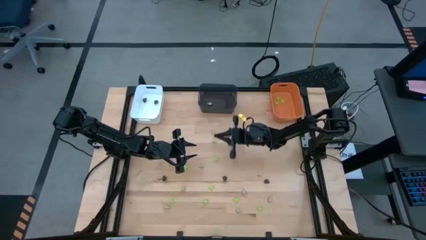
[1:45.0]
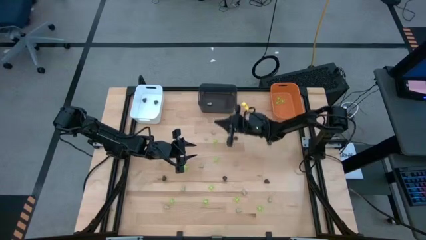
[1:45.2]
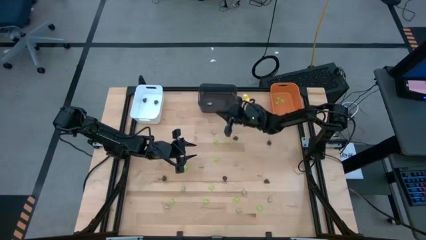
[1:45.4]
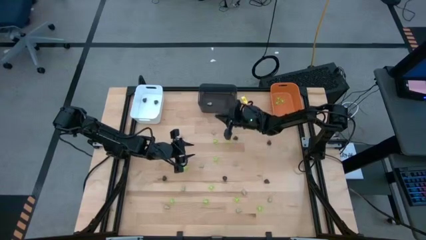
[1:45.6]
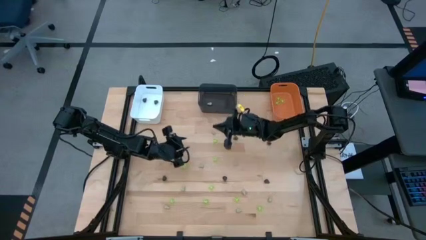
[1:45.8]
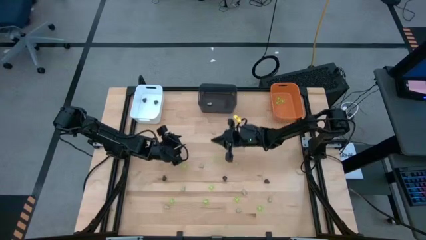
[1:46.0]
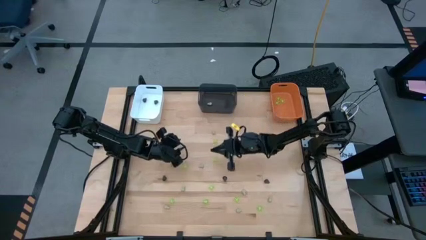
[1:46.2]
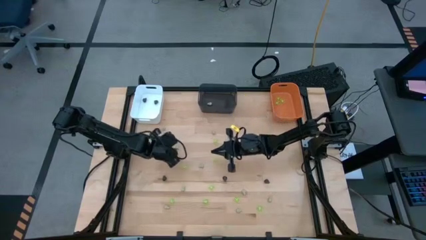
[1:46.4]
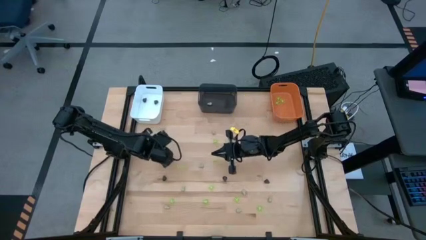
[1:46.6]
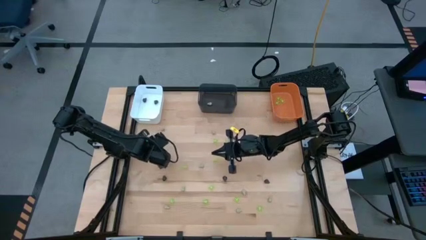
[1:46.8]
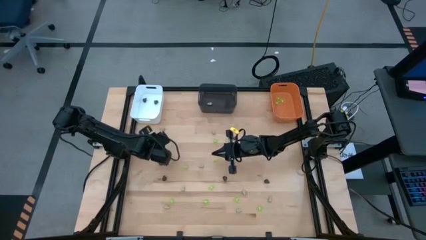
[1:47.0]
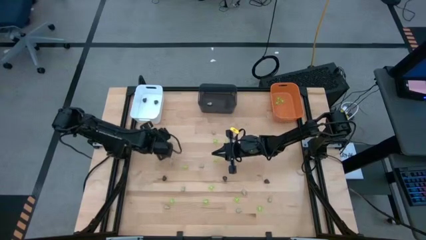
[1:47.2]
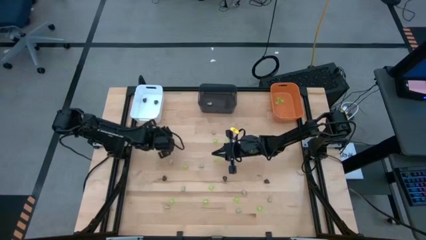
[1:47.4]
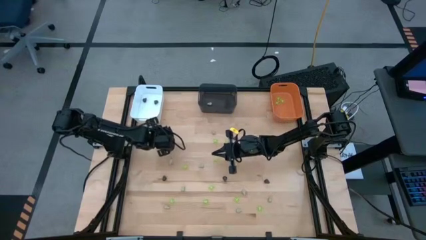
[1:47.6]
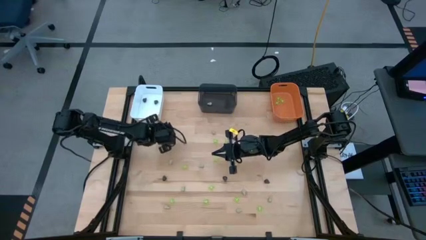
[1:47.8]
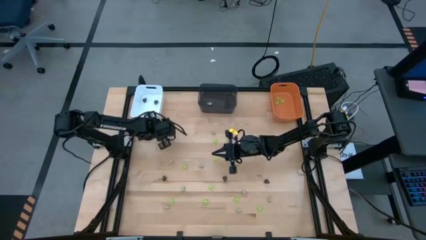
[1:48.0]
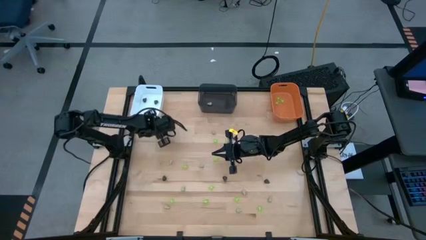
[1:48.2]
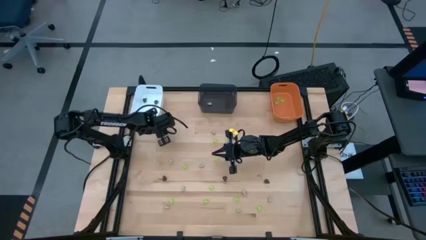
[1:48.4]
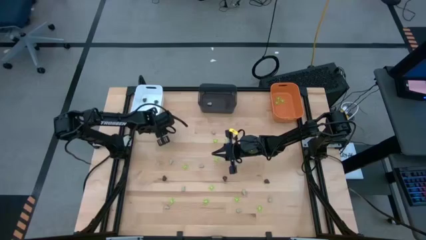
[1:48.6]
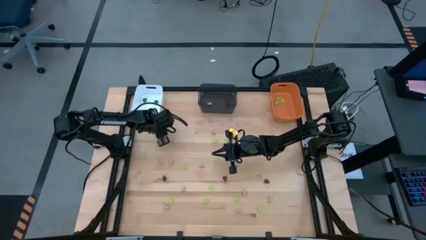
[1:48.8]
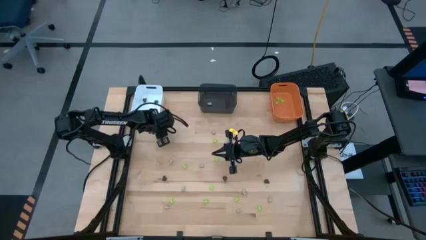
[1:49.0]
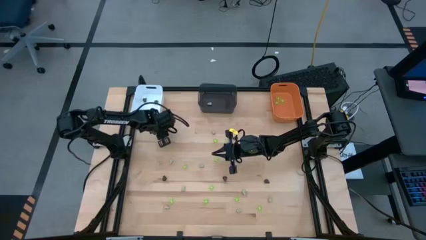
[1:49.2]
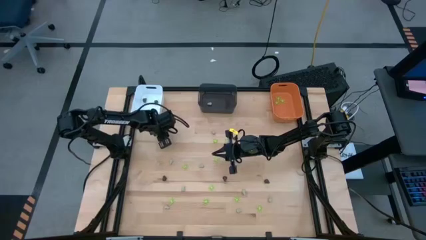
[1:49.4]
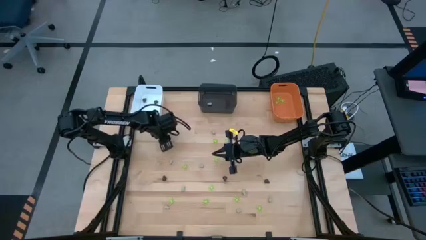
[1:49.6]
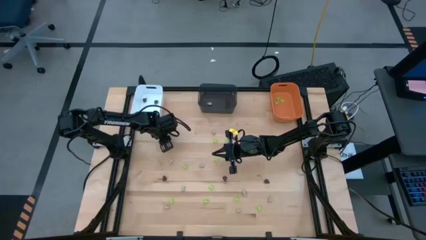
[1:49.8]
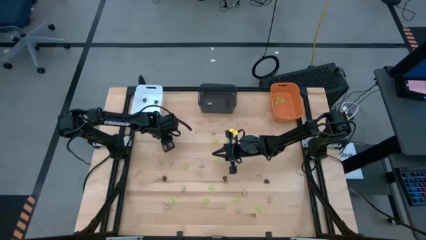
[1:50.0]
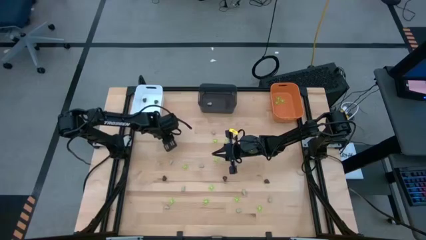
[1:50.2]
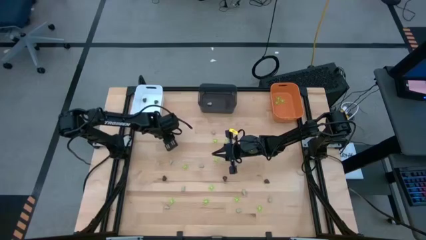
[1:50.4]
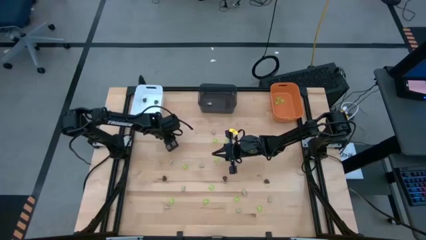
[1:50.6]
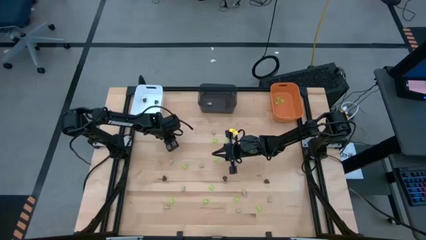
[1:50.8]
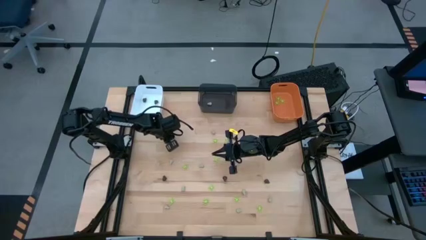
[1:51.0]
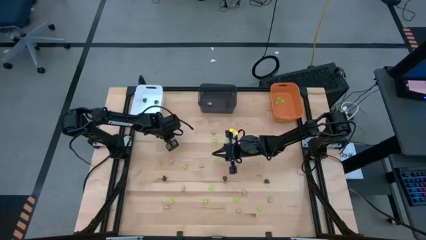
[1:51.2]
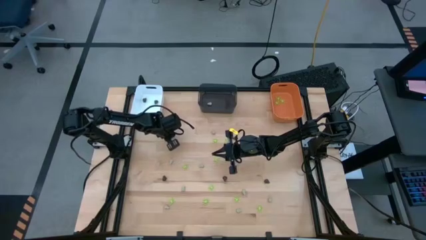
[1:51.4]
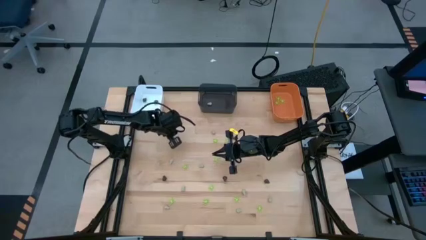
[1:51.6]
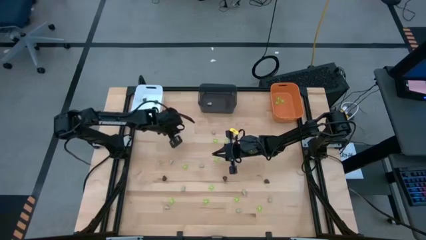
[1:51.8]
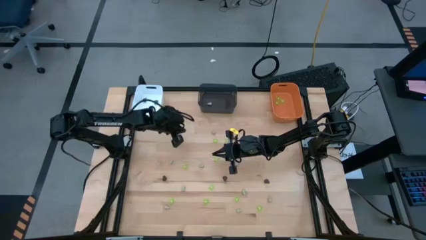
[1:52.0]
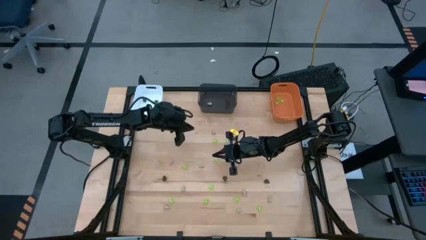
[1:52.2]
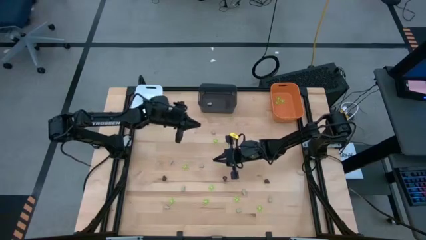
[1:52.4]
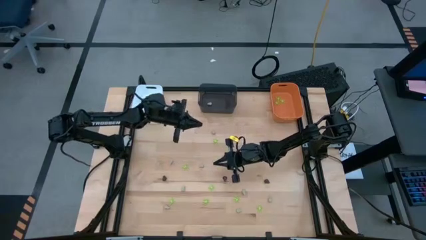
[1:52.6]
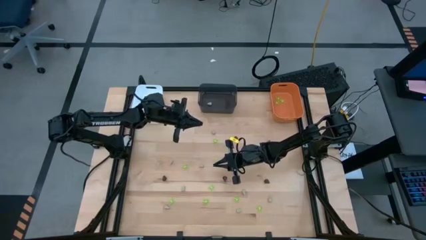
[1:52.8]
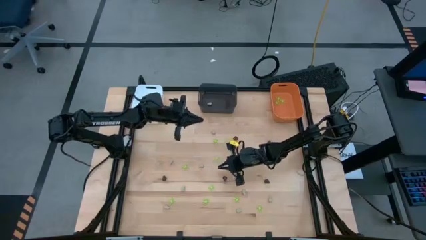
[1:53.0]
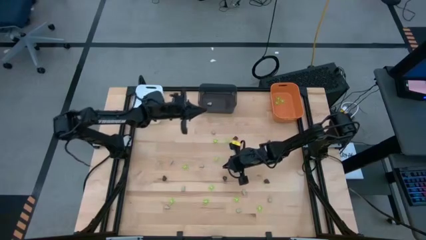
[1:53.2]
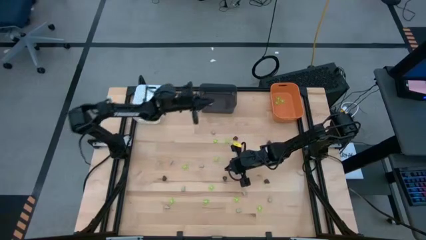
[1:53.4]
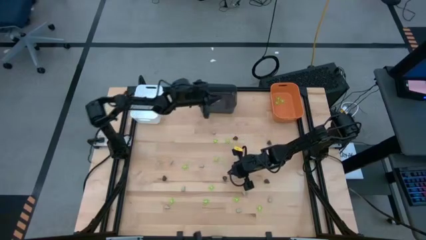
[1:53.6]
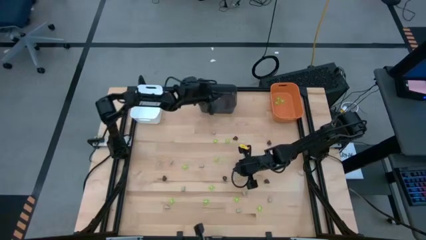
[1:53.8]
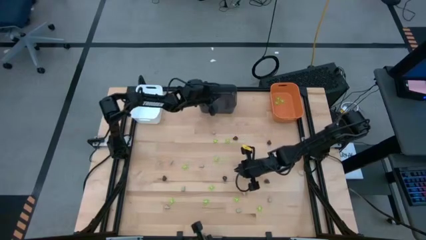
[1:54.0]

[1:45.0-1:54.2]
Task: Sort Halloween decoration
Put the white toy skull into the black bin

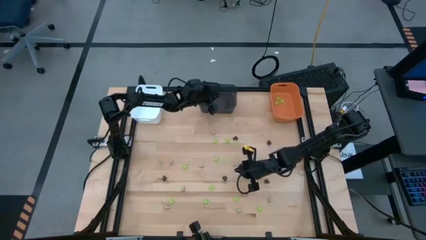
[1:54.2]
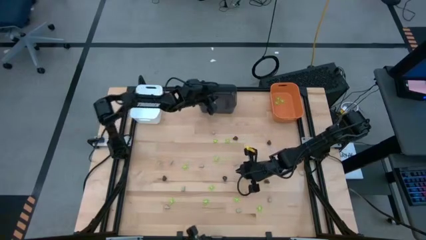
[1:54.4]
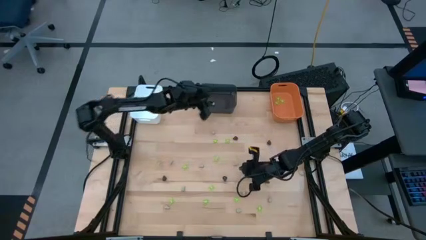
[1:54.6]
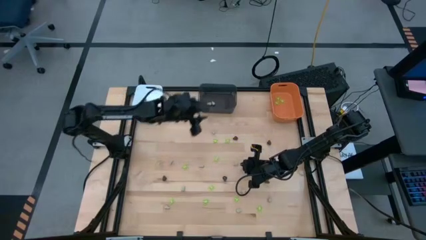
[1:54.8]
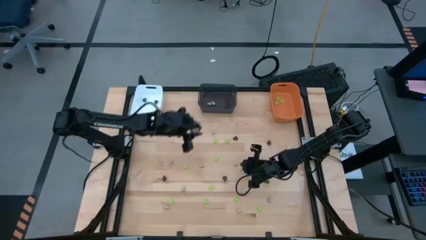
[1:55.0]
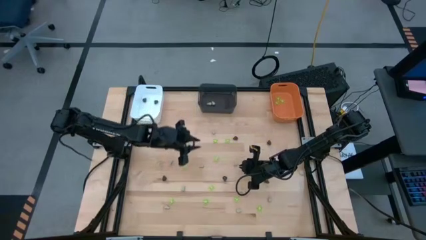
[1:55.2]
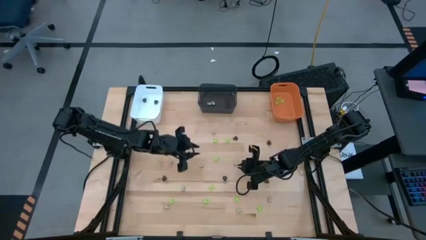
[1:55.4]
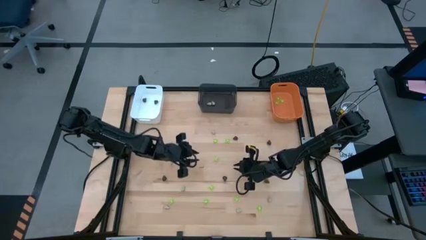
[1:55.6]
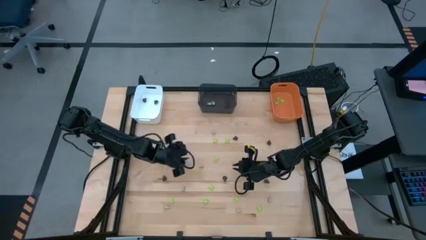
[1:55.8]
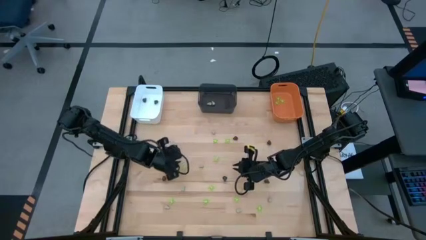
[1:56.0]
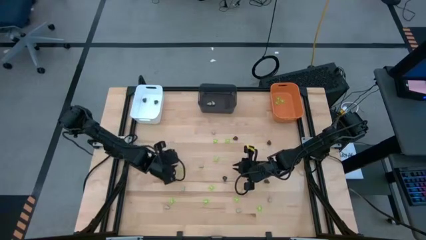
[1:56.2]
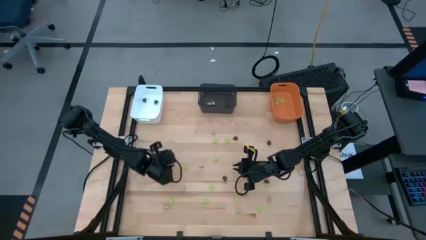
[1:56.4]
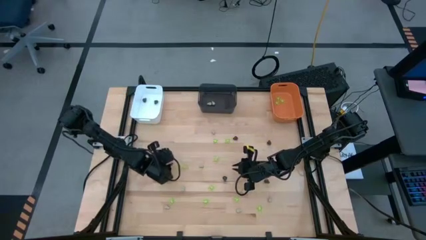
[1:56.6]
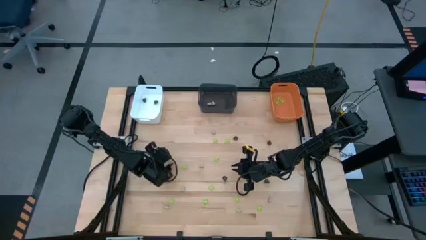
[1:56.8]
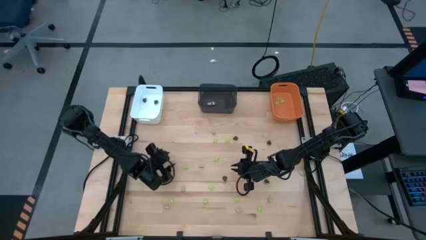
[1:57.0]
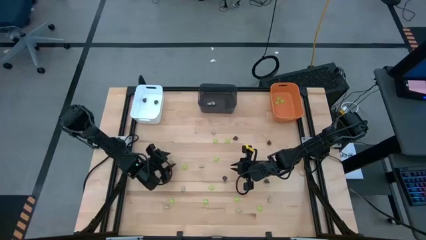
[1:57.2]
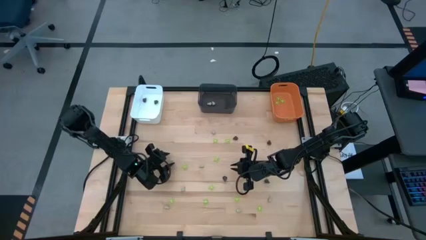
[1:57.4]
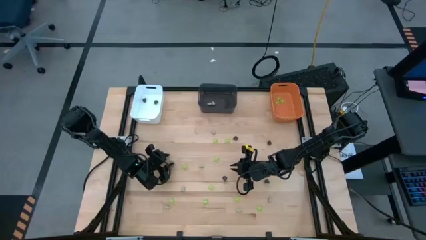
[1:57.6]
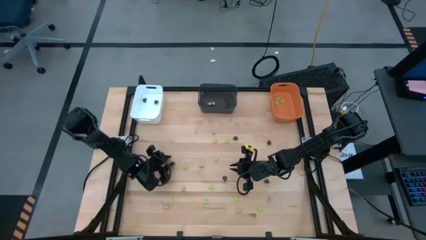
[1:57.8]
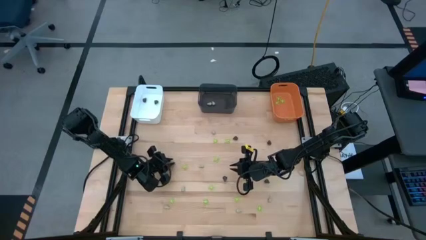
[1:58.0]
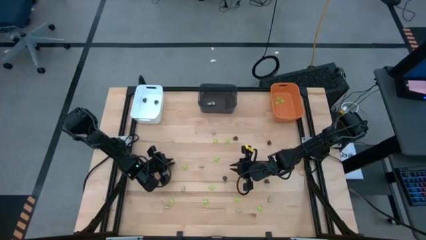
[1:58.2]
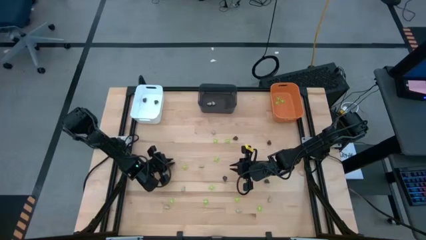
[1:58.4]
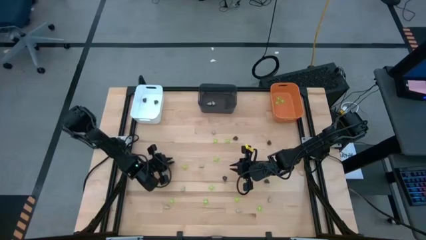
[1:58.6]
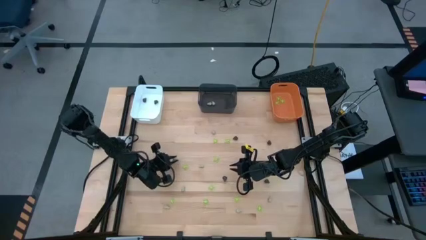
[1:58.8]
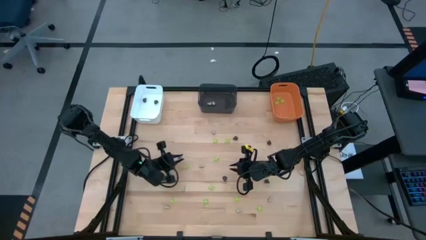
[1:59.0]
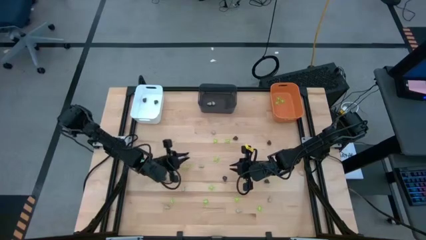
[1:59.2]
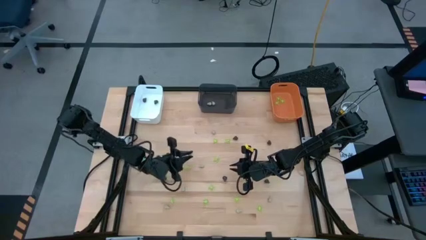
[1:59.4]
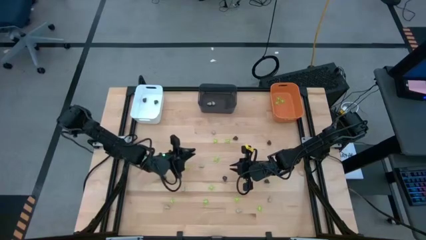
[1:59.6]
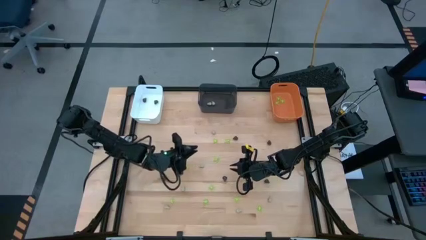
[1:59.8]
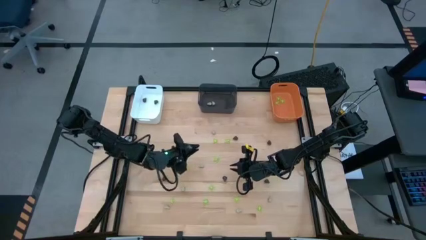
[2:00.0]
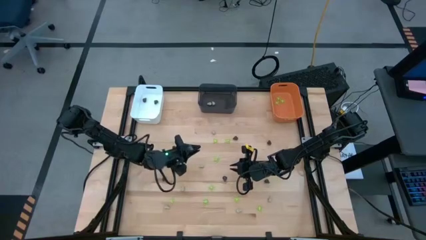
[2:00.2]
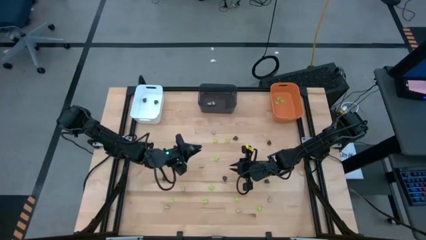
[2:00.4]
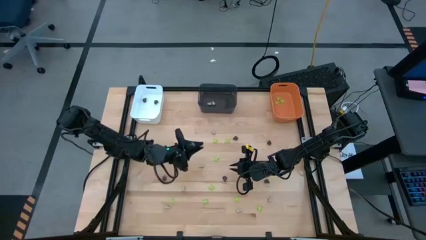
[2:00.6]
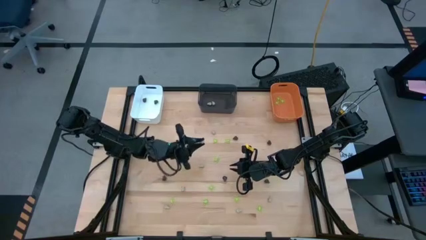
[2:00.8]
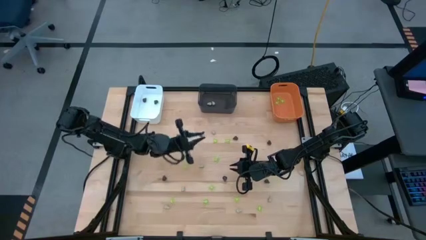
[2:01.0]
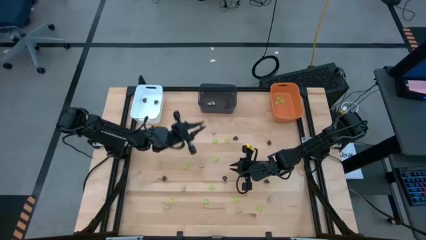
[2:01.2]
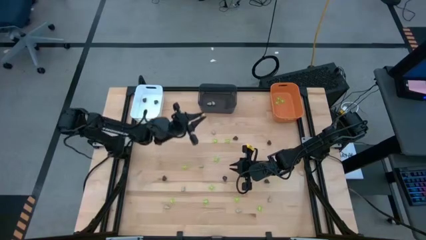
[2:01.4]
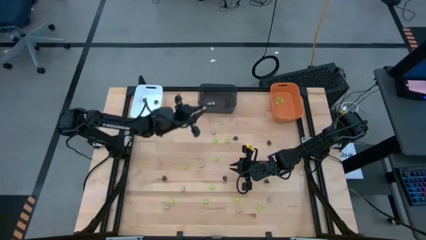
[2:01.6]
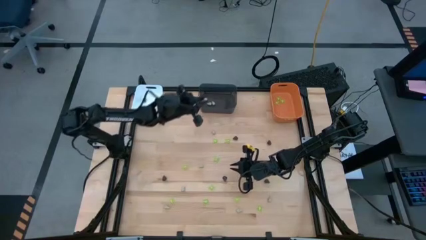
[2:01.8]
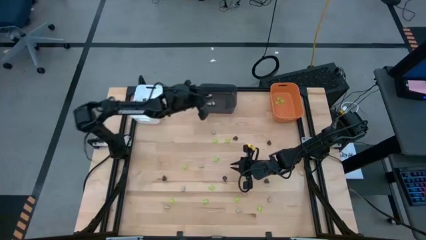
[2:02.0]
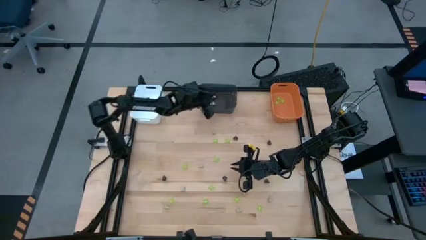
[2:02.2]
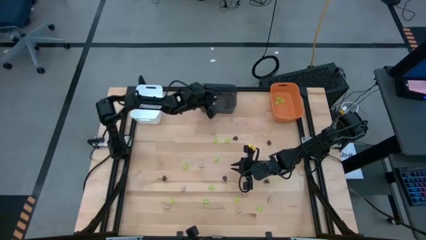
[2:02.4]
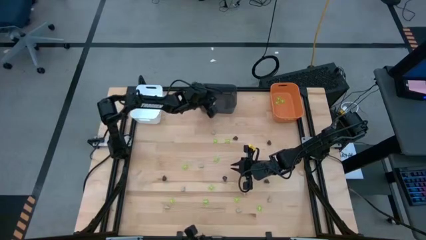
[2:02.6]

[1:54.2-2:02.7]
Put the white toy skull into the black bin
